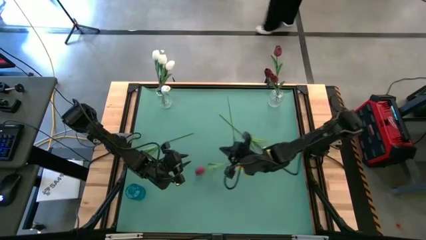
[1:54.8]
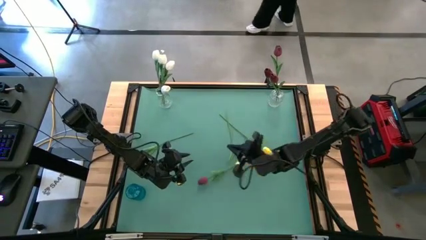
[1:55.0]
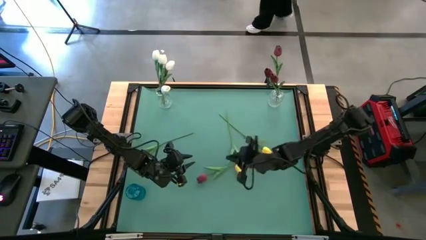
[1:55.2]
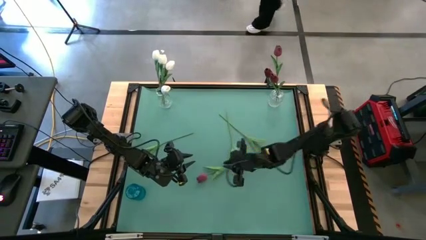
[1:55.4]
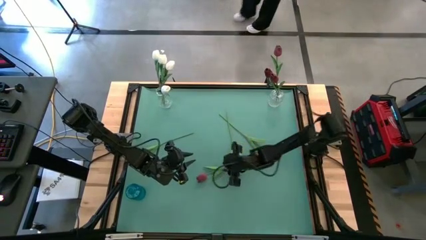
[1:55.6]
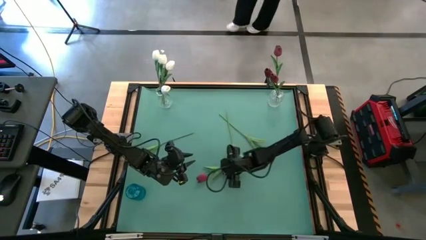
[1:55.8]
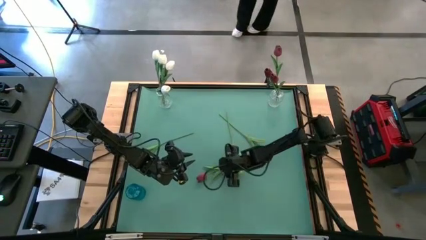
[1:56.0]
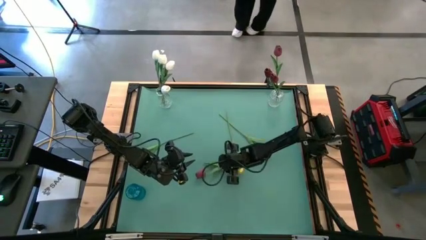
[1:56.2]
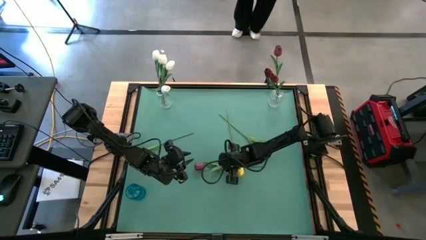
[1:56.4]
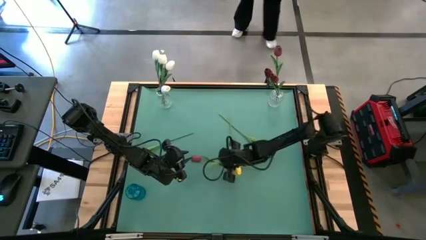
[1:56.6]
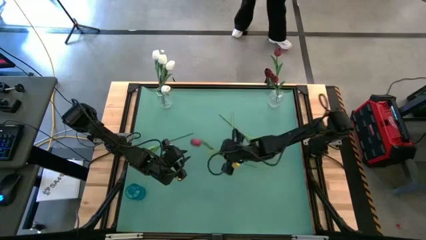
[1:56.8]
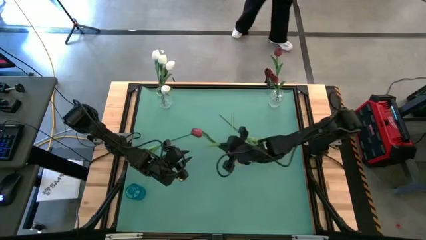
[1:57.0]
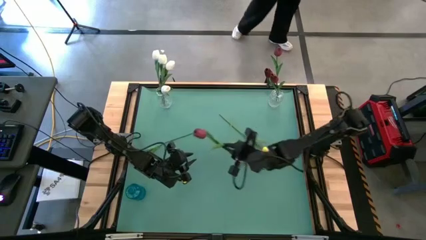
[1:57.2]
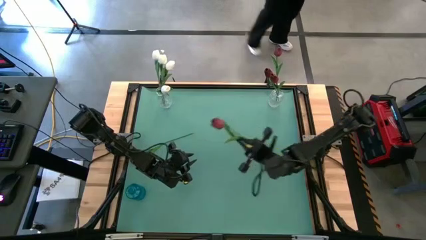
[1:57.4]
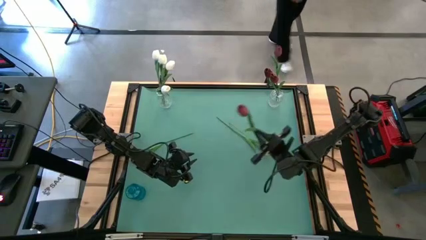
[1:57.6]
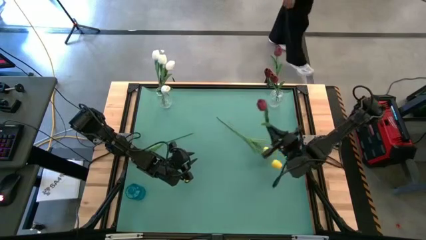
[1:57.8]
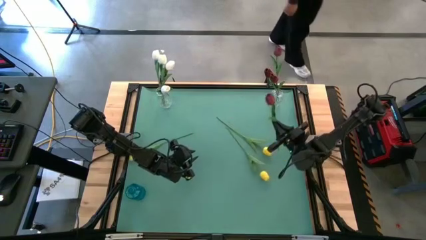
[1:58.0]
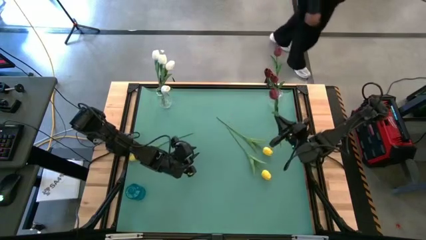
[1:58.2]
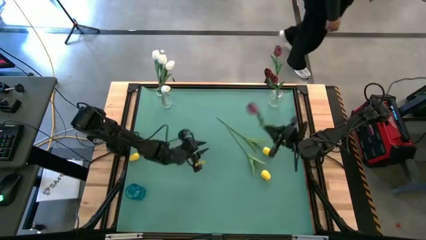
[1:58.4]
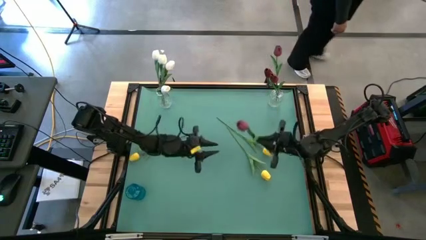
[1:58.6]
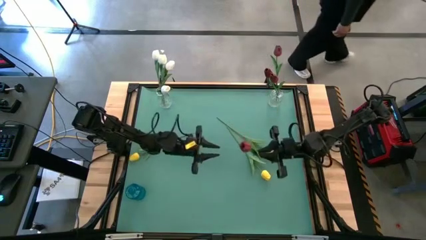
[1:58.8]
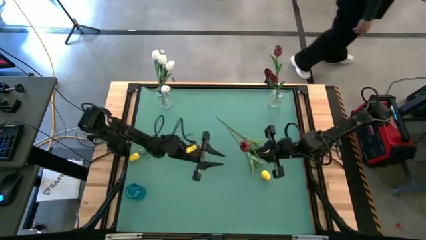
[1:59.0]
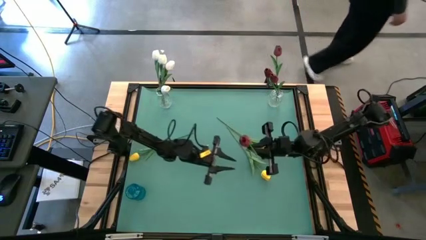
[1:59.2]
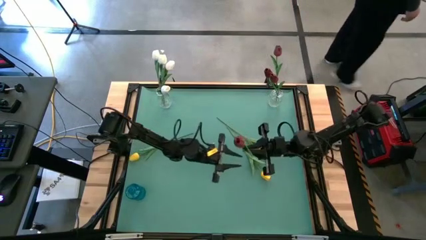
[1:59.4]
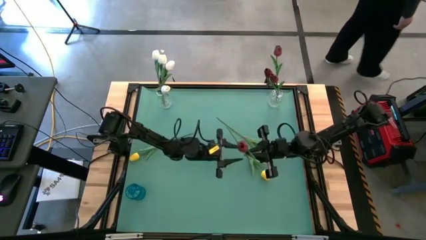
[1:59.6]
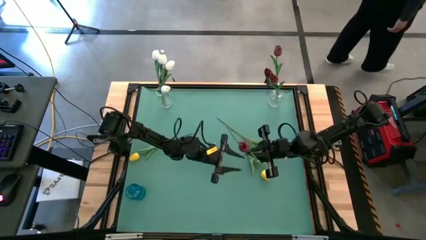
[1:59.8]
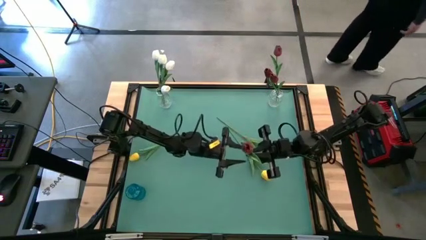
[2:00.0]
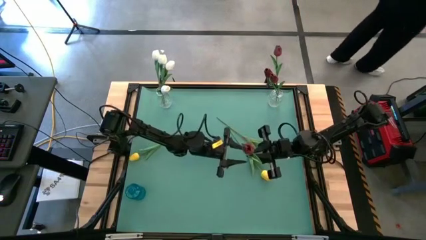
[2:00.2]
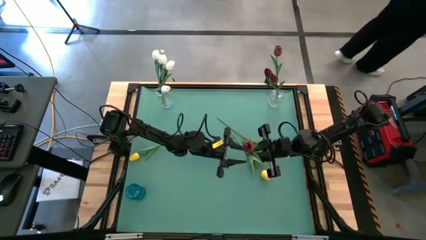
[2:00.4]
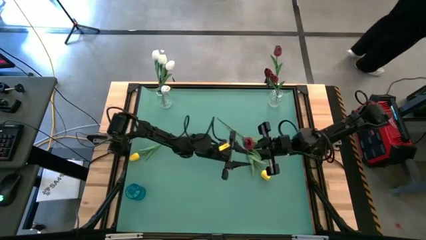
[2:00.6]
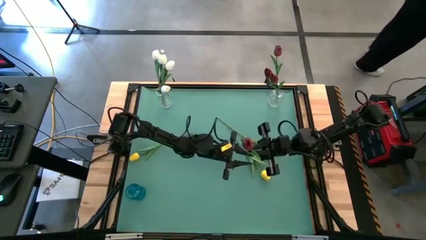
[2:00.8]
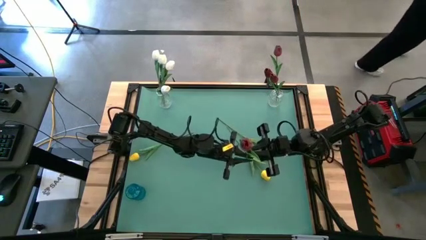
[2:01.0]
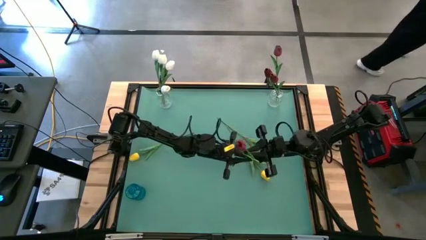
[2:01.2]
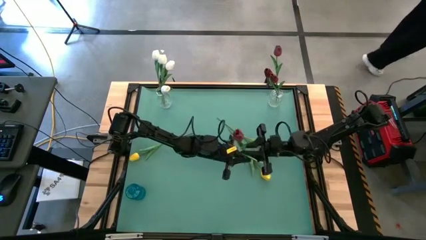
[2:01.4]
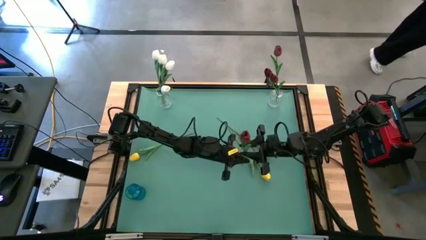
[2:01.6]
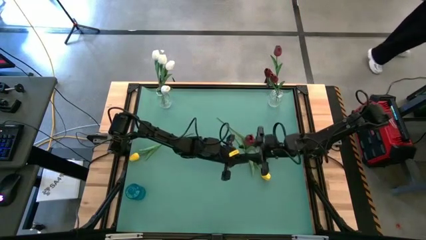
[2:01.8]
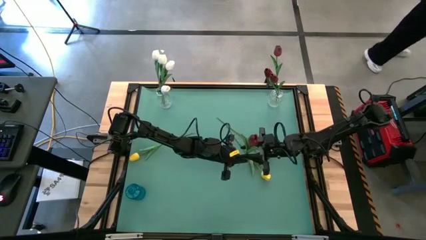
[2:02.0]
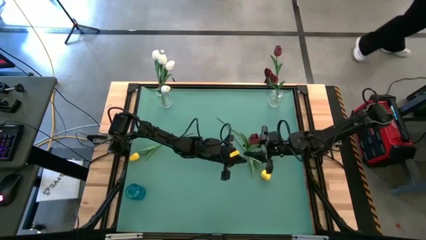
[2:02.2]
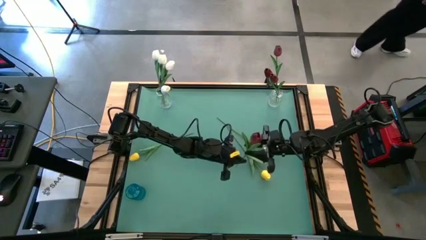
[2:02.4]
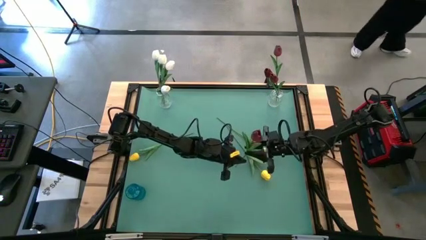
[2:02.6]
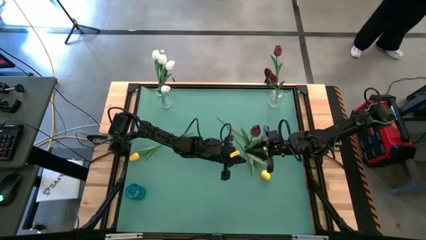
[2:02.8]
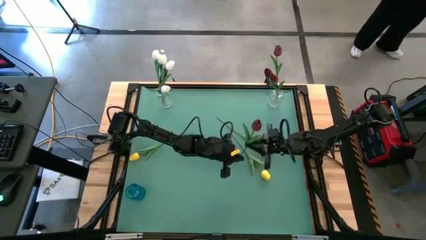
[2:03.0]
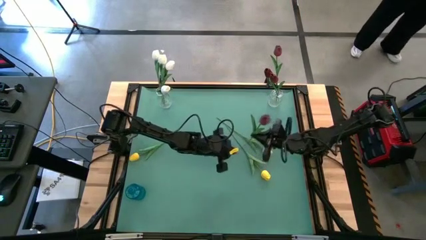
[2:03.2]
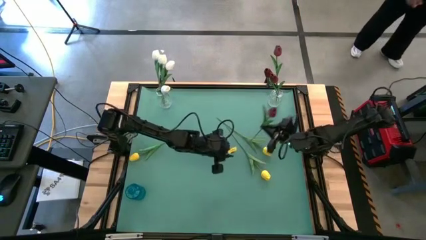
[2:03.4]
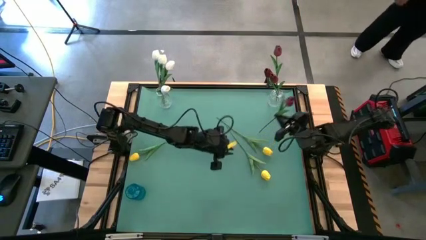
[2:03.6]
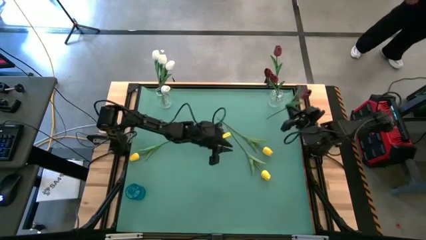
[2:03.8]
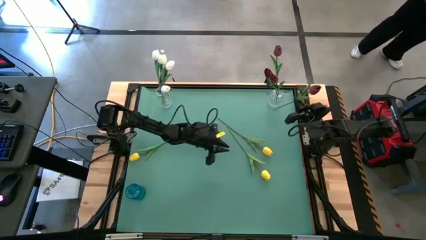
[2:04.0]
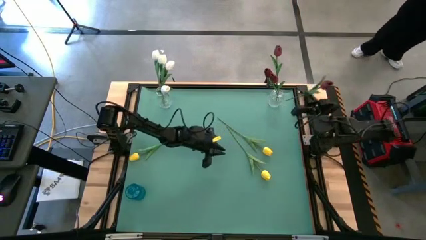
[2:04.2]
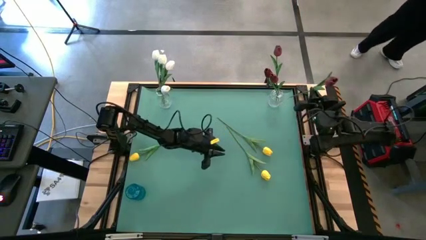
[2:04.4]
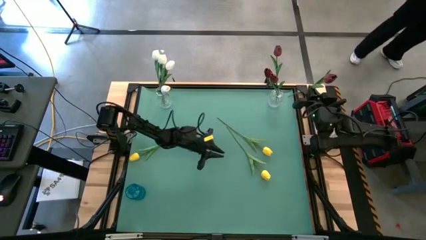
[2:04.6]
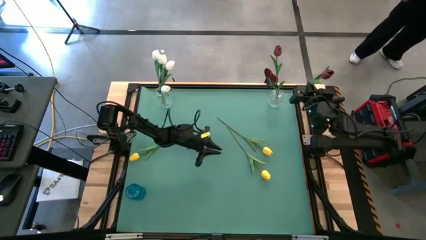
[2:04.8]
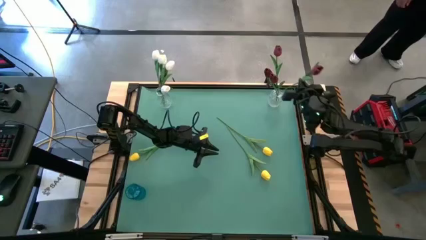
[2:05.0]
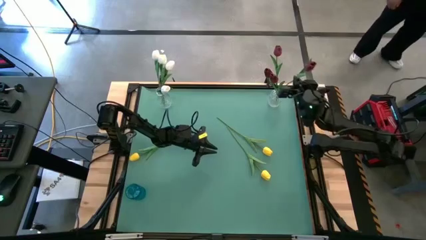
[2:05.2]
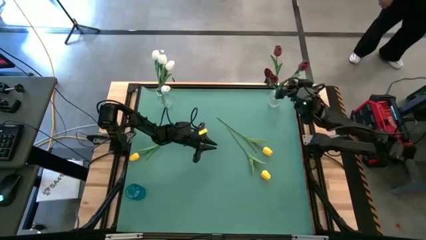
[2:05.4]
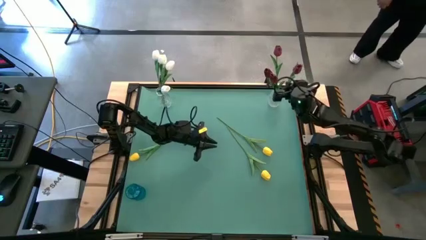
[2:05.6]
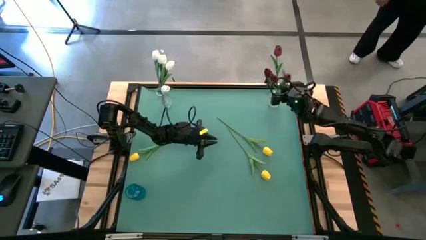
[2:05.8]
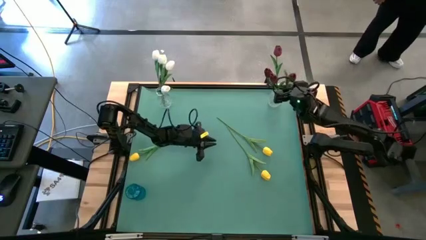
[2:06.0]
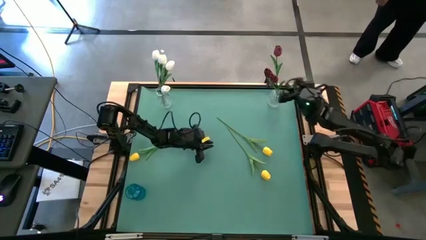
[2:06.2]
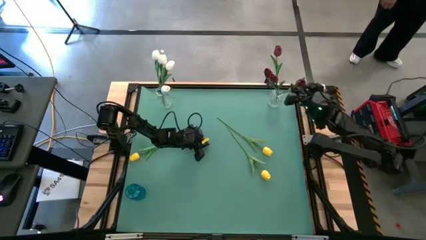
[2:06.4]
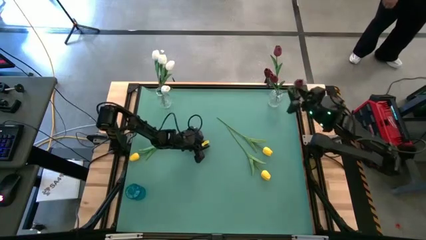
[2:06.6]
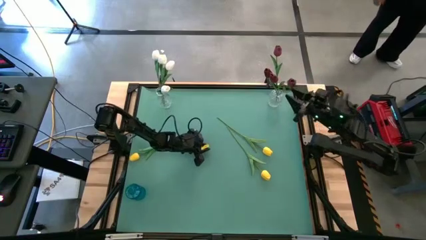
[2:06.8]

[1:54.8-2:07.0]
Task: Sort flowers into vase by color
Put the red flower into the right transparent vase

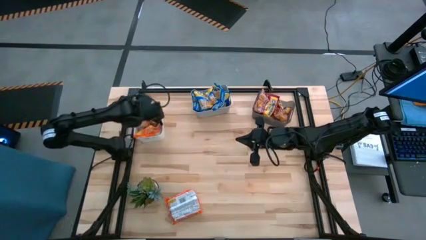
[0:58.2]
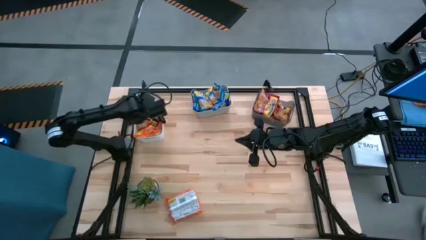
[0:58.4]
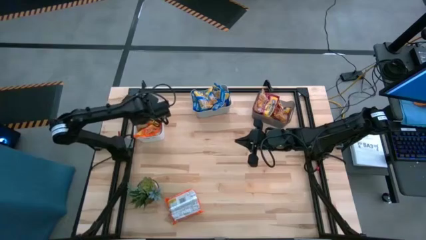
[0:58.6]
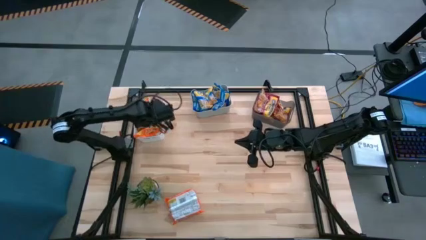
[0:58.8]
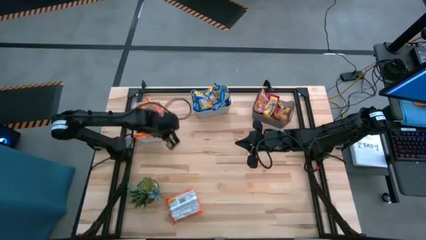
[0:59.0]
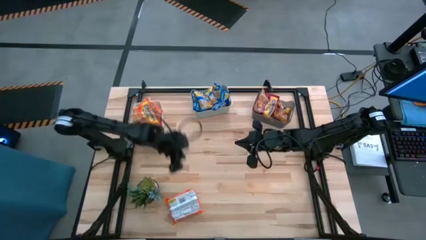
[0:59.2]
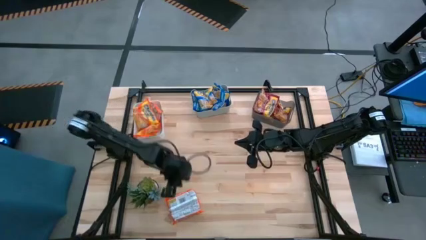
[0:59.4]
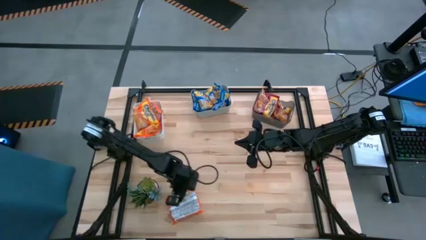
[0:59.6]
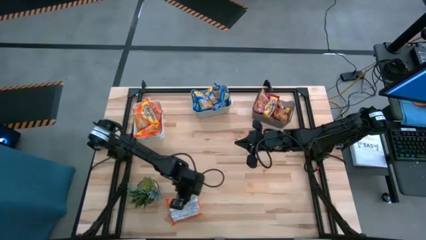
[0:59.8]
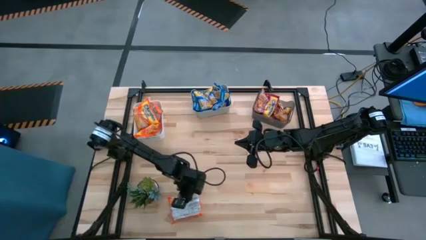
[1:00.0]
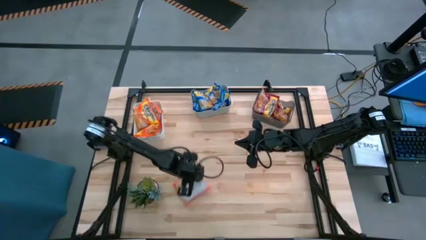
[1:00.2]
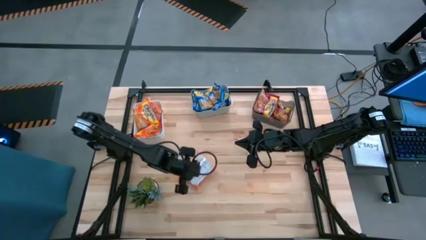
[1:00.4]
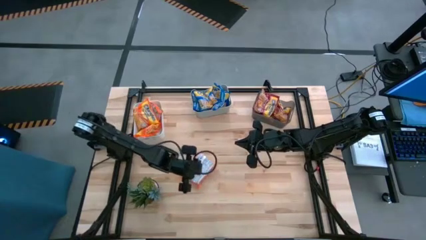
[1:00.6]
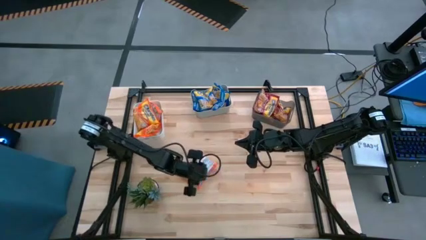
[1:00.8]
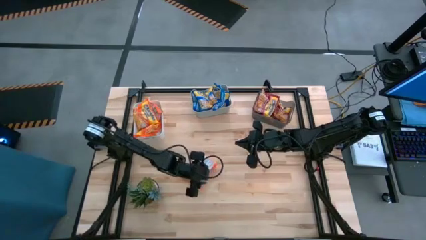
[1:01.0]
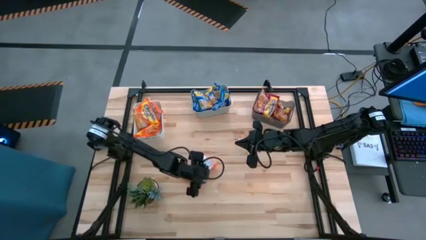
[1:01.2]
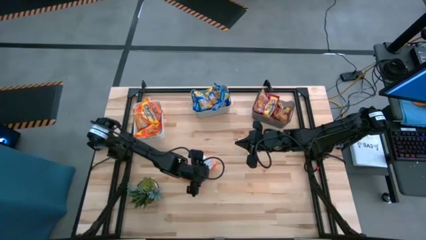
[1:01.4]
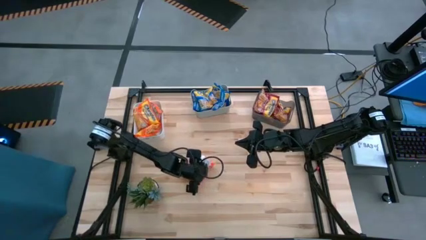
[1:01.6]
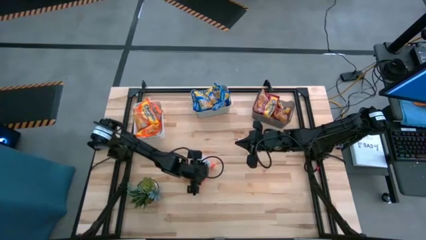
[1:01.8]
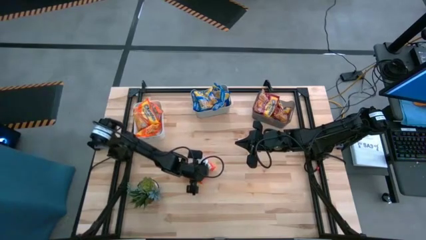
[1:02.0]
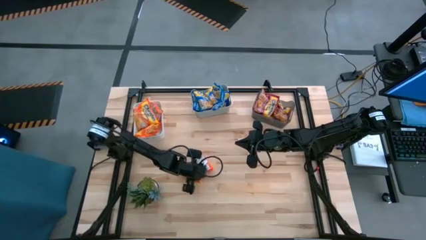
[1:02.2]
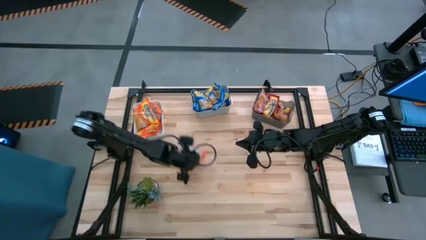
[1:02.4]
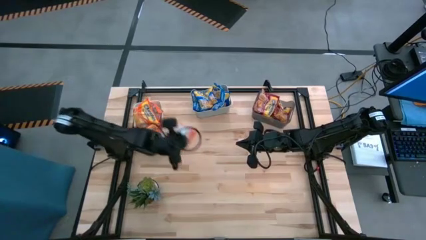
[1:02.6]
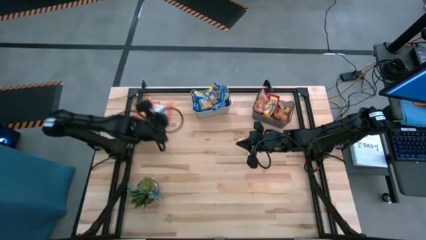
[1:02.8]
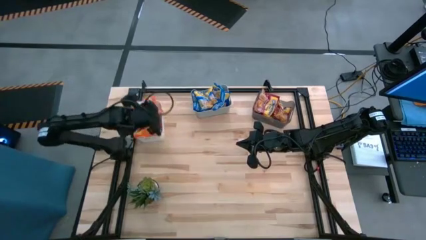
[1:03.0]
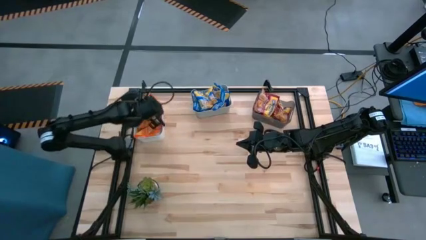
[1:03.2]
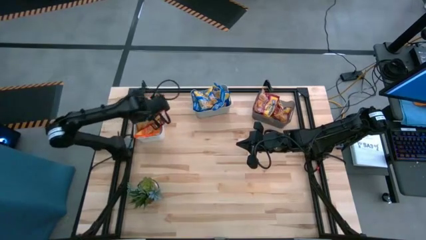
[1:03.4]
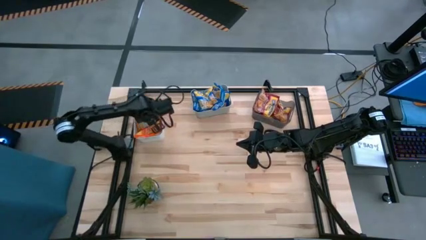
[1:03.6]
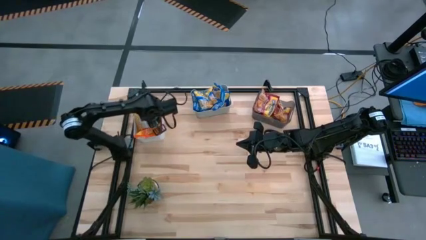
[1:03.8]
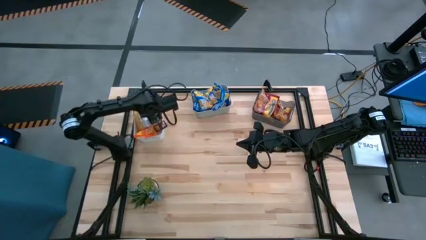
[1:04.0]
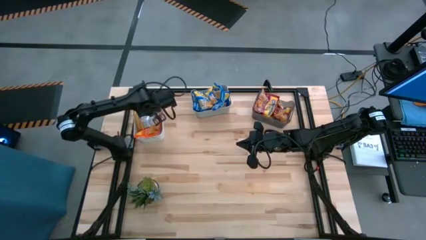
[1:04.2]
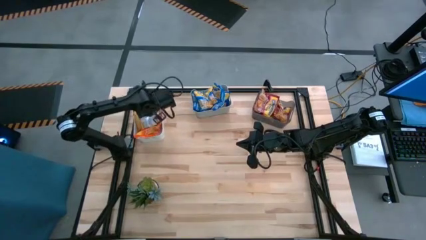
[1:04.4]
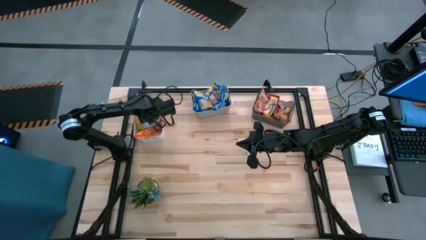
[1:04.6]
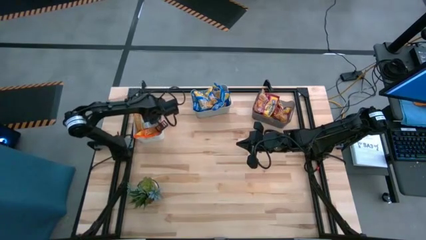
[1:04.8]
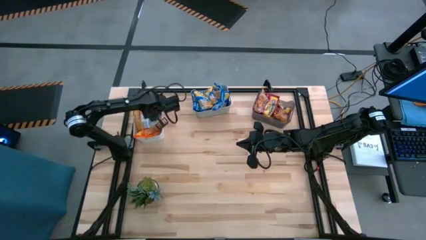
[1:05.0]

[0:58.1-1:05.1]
Task: Sort Maruchan noodles
Put the orange noodle pack into the white bin
